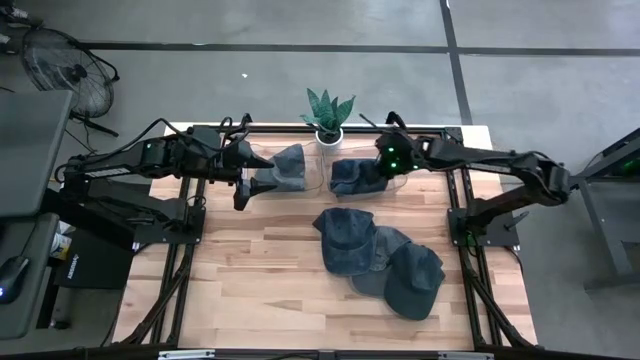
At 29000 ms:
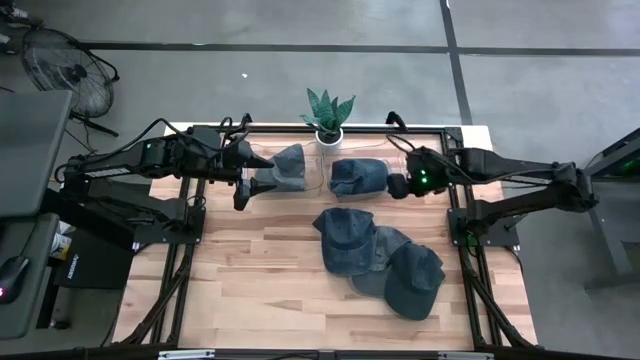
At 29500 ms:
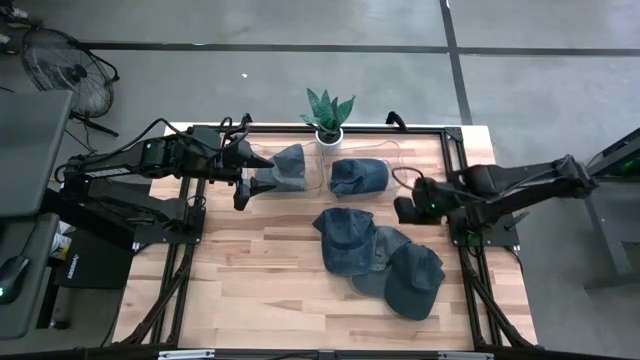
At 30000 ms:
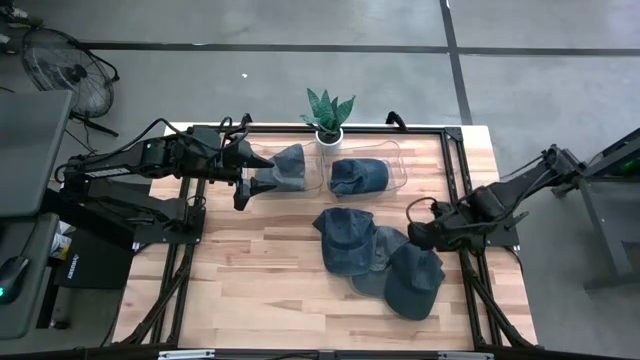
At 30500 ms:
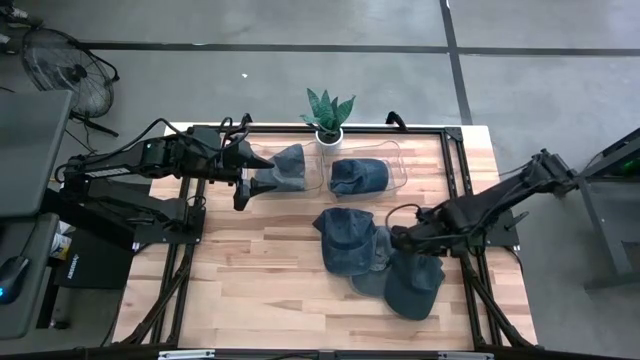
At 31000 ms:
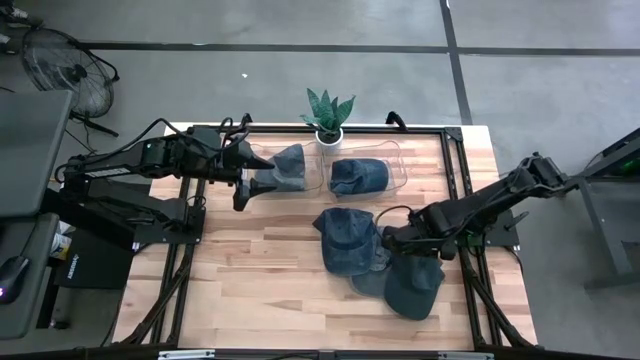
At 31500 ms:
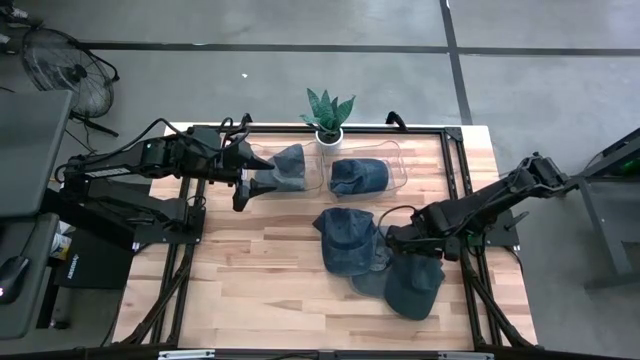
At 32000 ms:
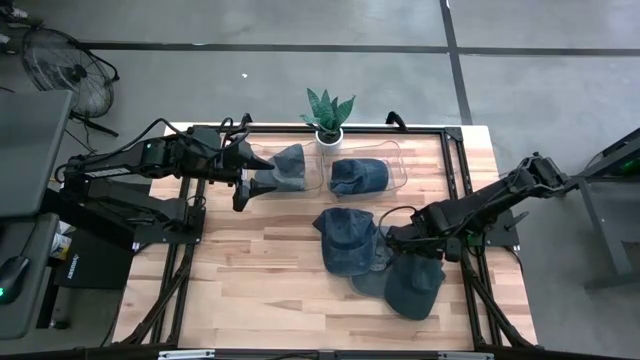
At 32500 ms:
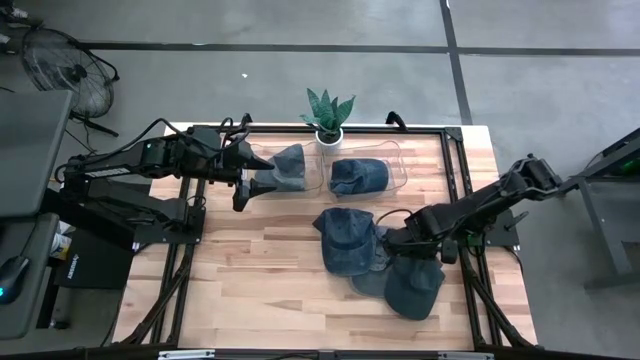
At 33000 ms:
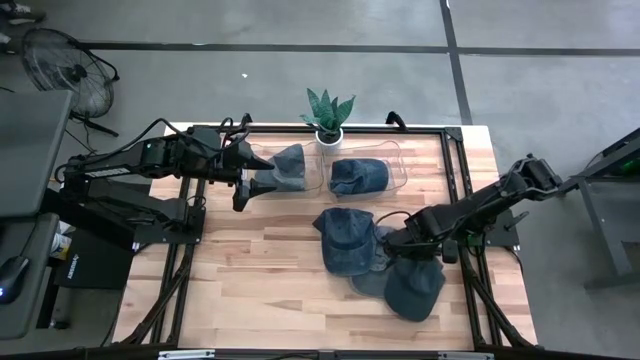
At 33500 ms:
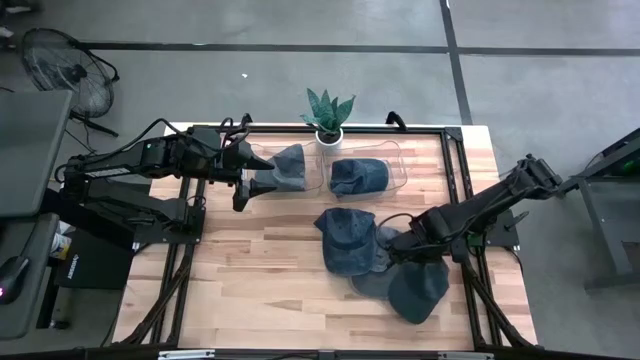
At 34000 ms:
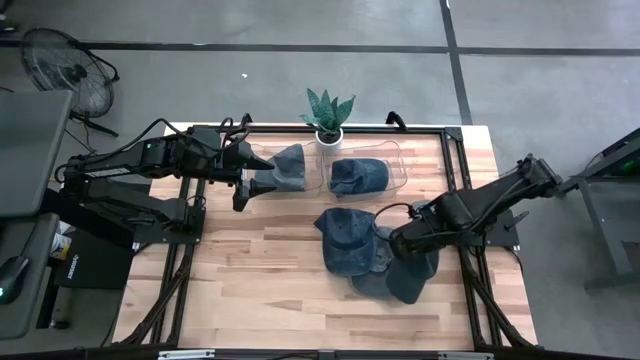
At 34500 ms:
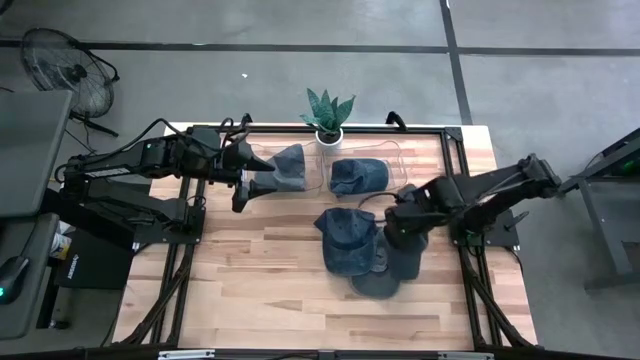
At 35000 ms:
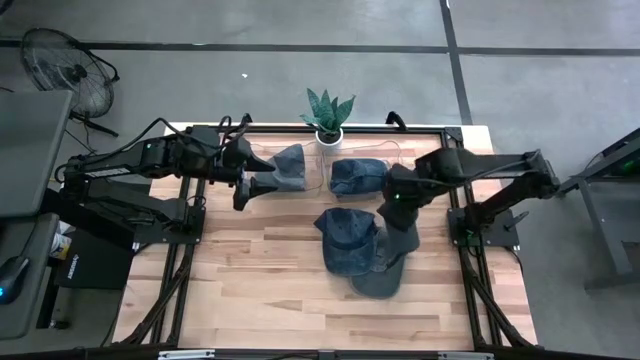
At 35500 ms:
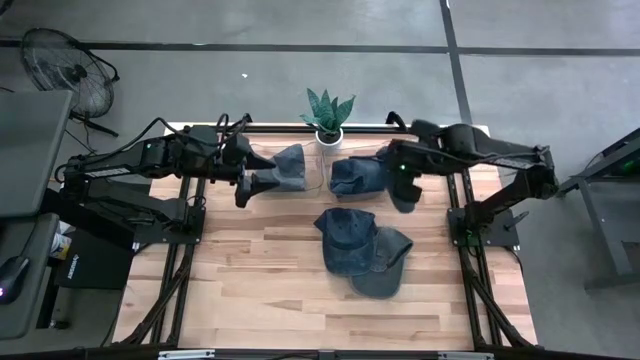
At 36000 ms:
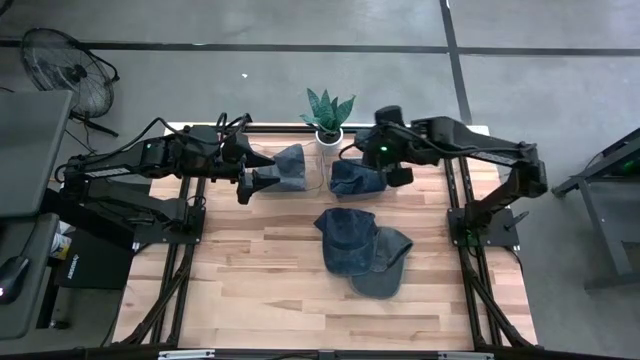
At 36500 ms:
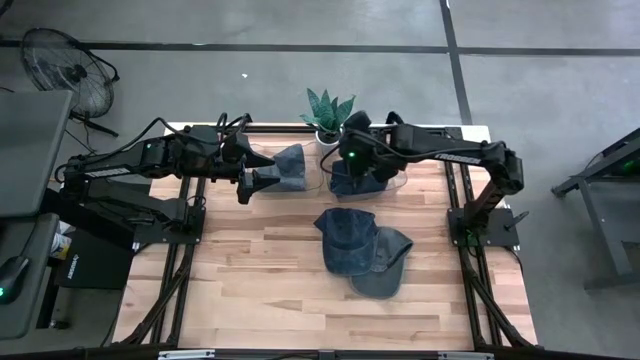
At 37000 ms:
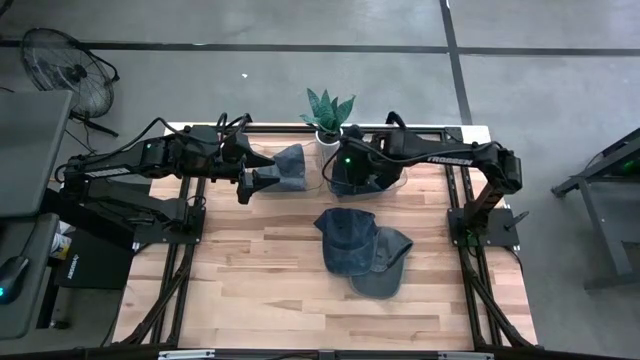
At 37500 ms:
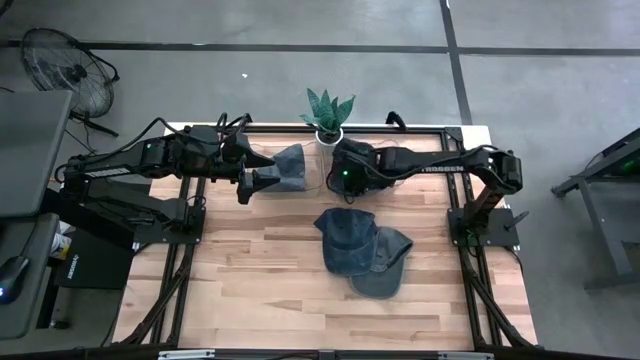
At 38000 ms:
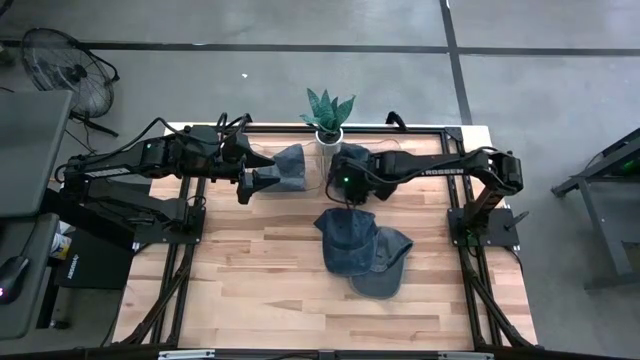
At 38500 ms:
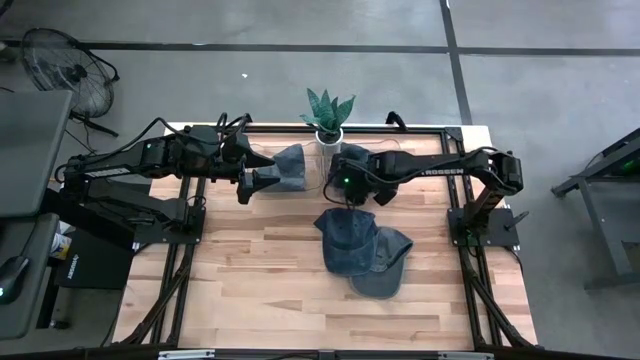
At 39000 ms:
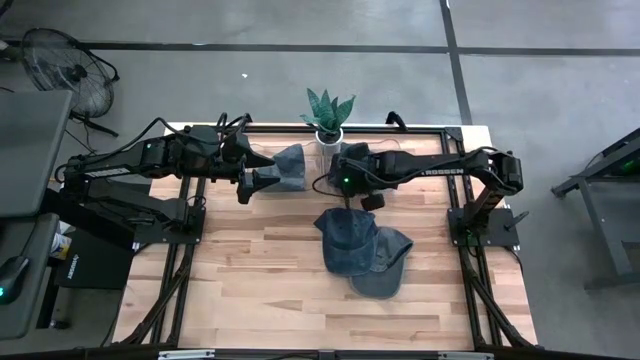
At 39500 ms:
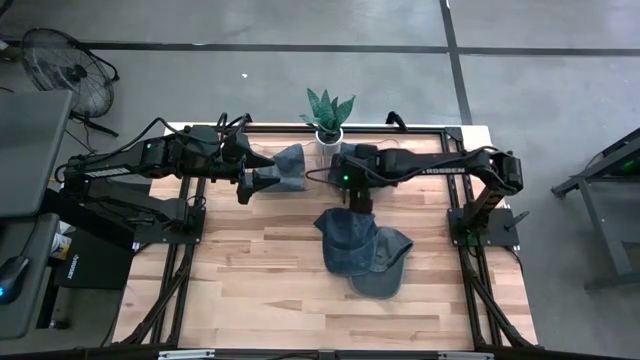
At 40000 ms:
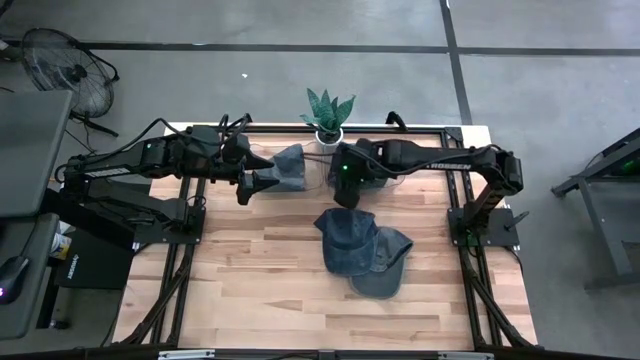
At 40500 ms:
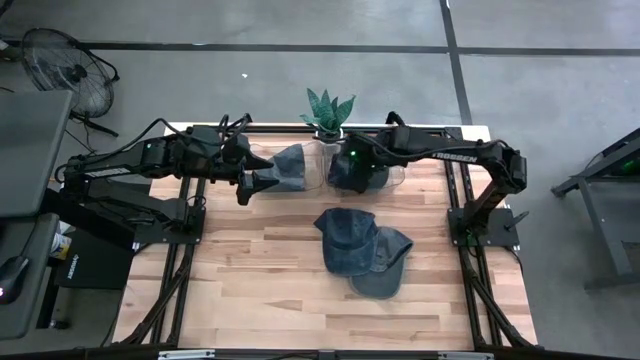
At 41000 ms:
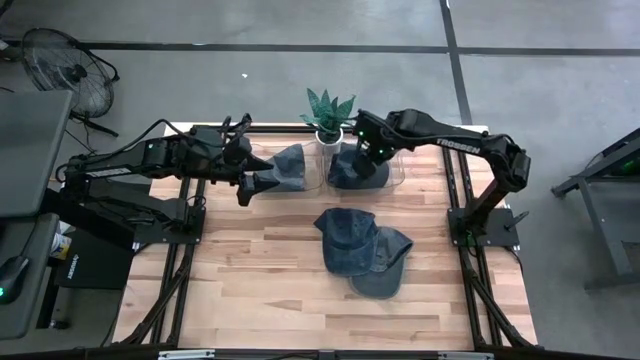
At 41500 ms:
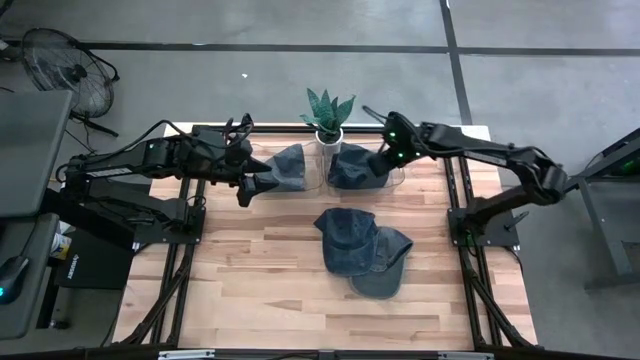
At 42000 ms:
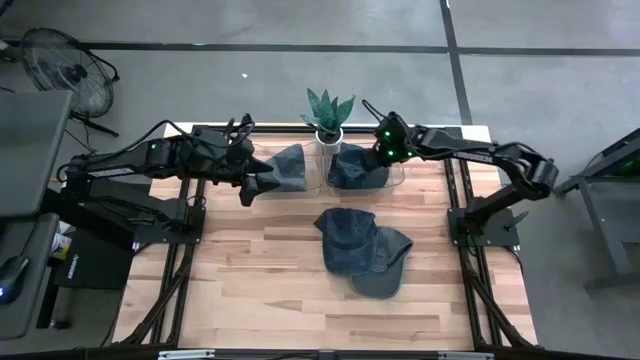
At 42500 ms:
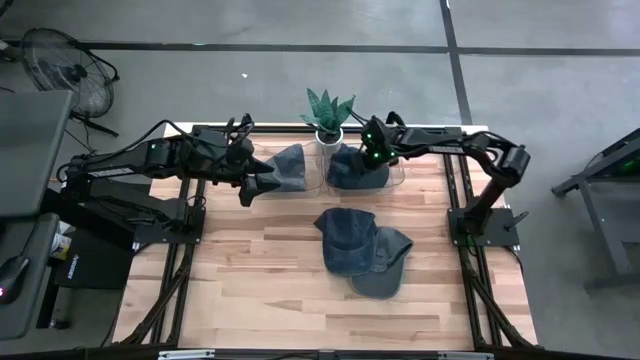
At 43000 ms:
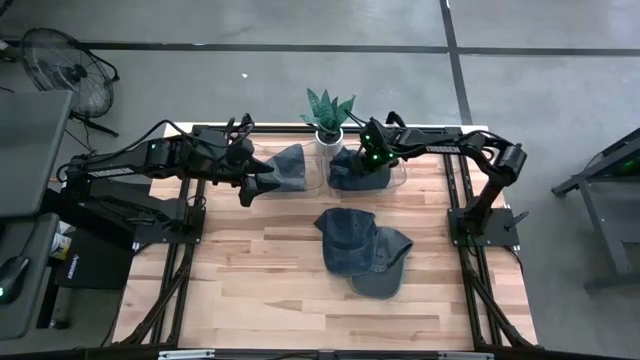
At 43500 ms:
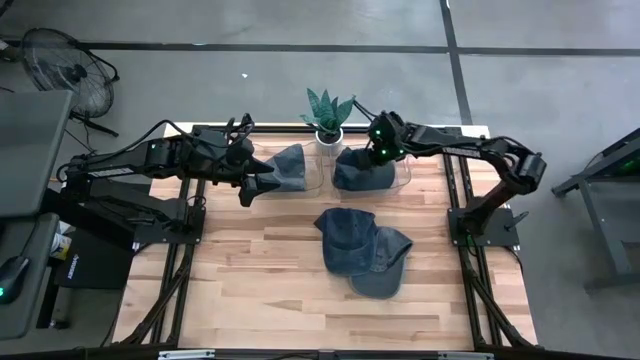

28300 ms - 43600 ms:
Task: Pick & Place hat
Put the right dark blue cap into the right transparent bin

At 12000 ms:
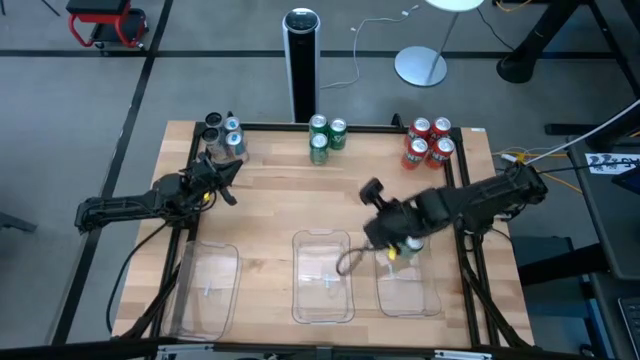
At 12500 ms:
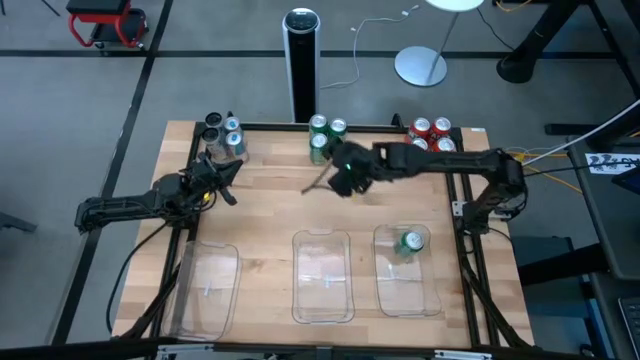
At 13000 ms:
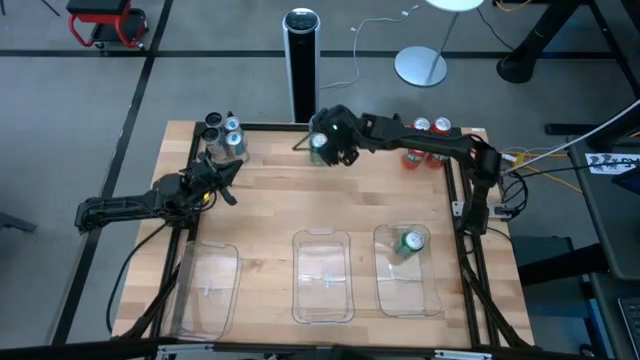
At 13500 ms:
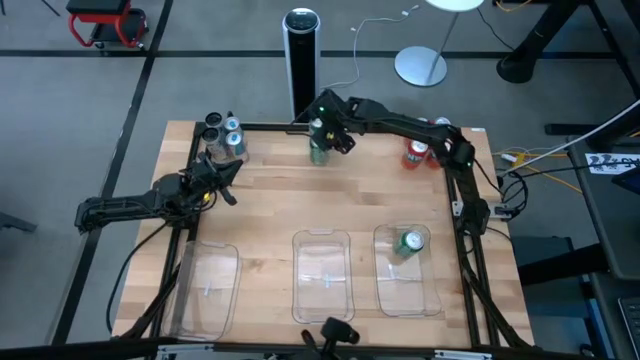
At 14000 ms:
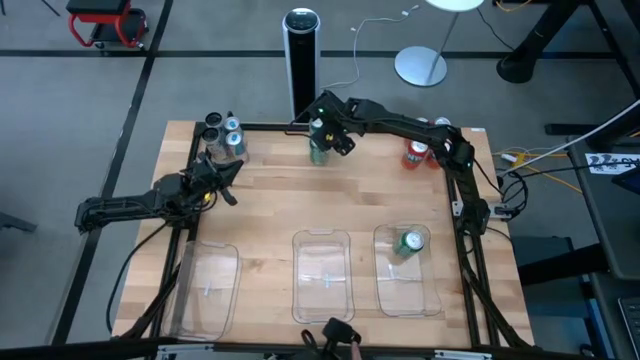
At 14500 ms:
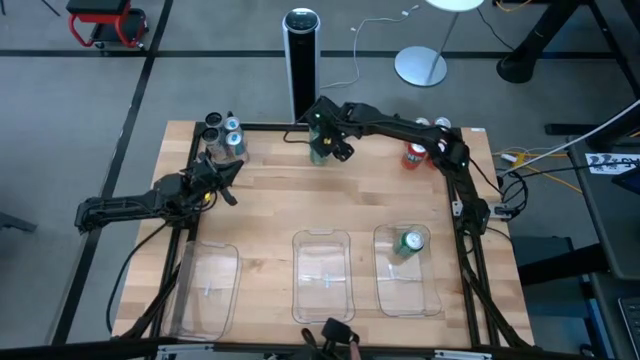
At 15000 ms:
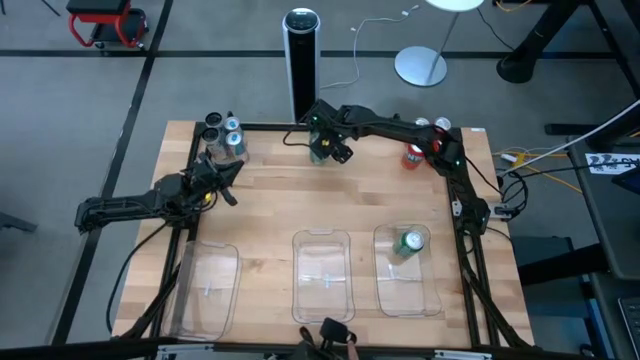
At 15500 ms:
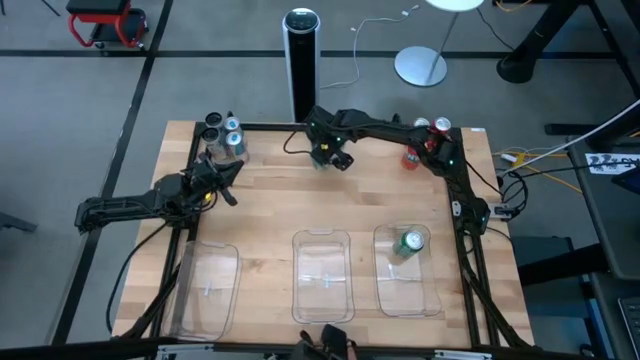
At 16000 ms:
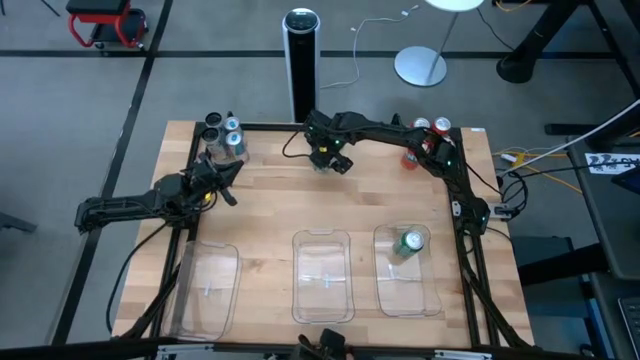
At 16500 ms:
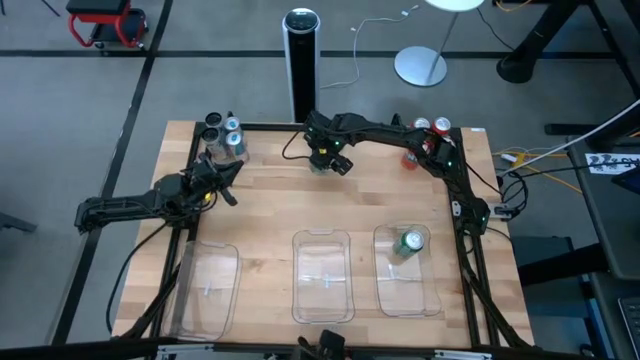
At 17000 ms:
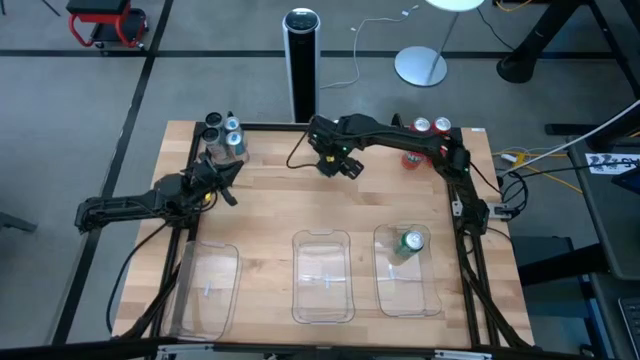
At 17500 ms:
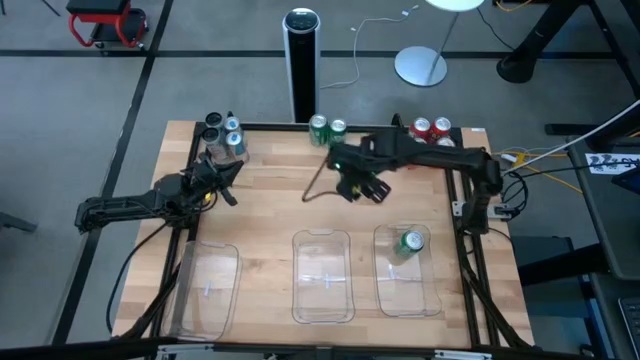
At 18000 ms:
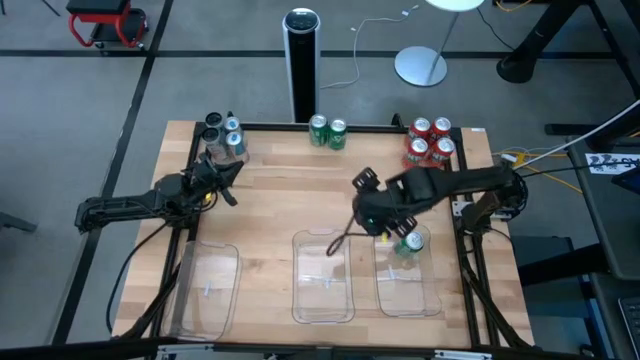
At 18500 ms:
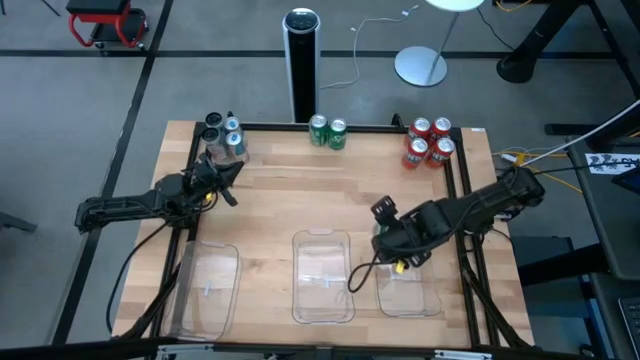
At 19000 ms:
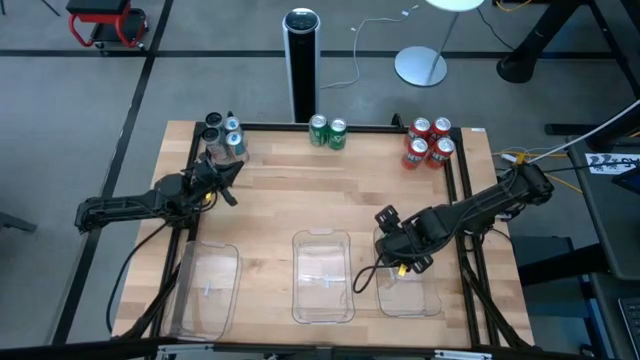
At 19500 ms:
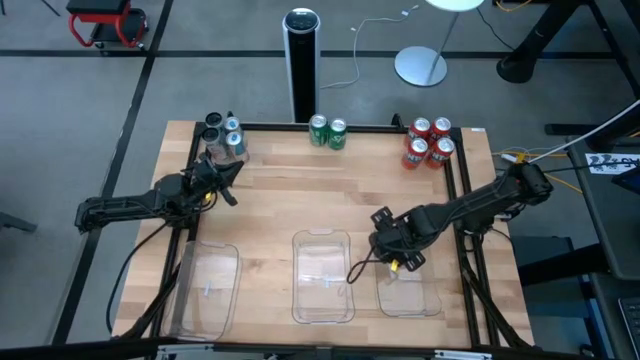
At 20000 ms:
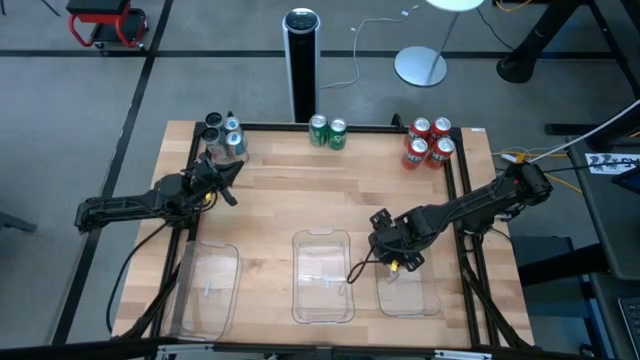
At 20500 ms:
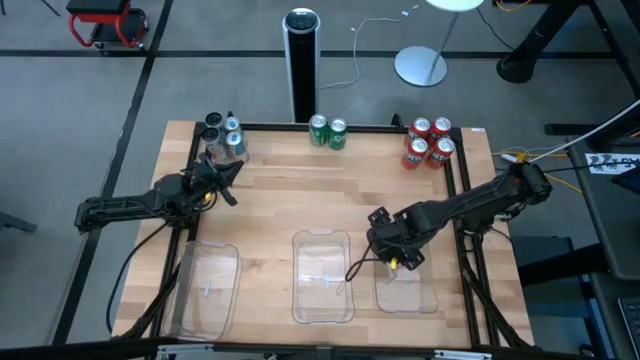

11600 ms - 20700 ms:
Task: Sort soda cans
Put the bottom green soda can into the right transparent bin
